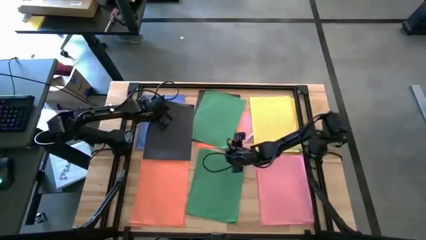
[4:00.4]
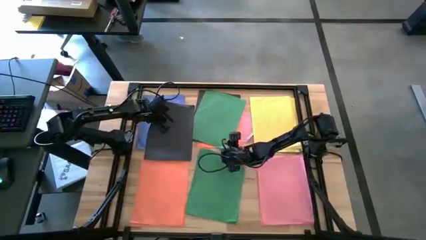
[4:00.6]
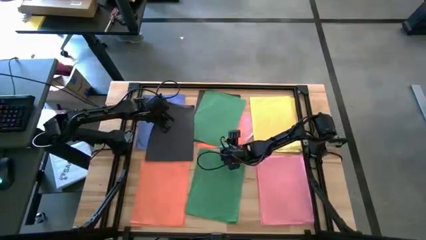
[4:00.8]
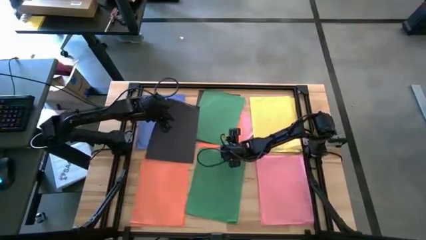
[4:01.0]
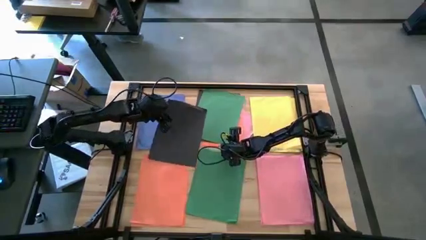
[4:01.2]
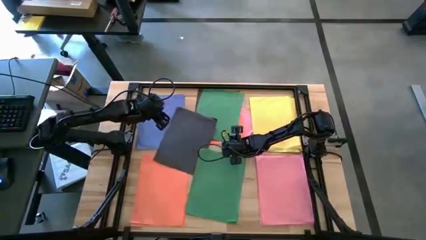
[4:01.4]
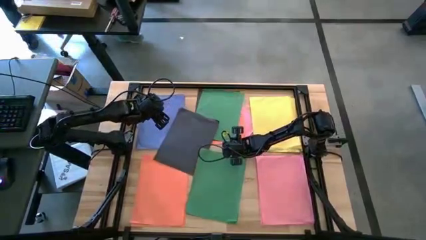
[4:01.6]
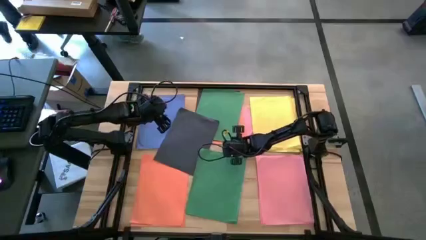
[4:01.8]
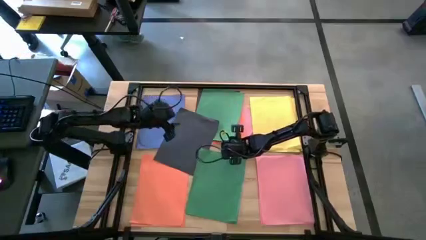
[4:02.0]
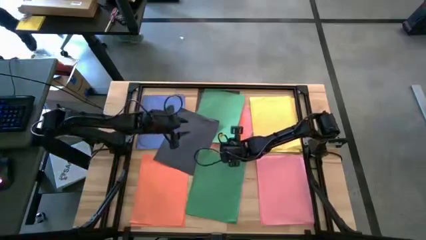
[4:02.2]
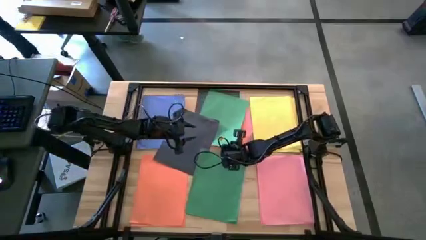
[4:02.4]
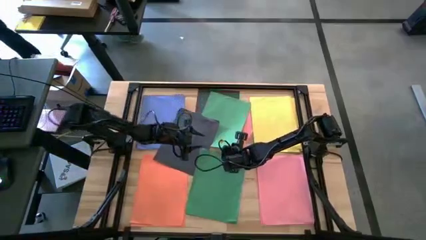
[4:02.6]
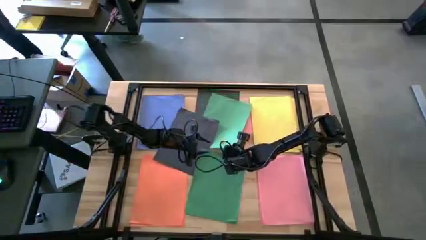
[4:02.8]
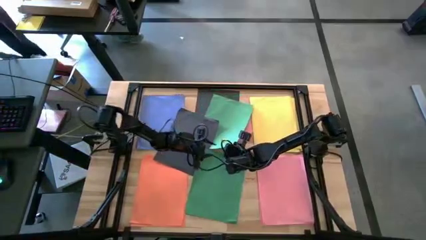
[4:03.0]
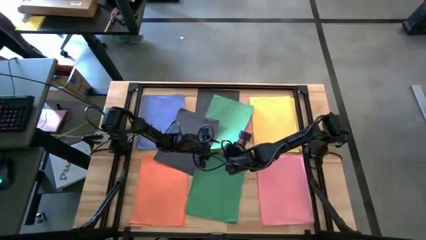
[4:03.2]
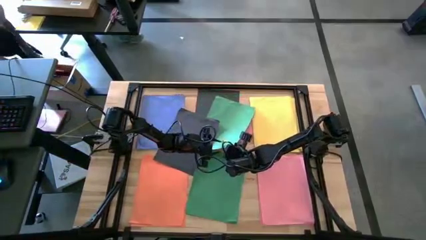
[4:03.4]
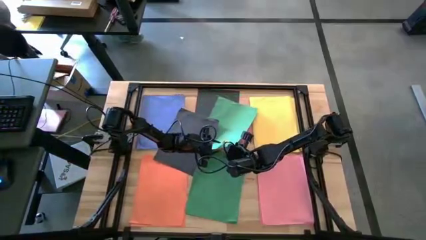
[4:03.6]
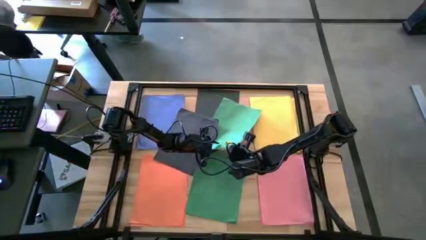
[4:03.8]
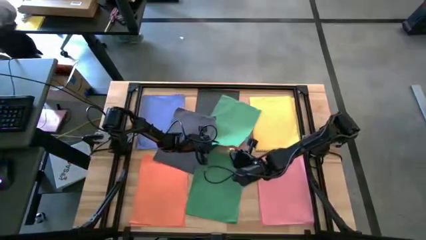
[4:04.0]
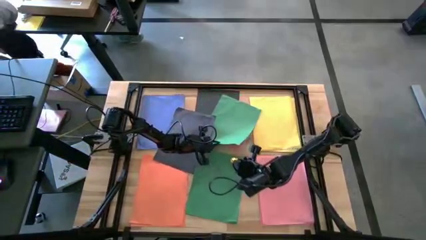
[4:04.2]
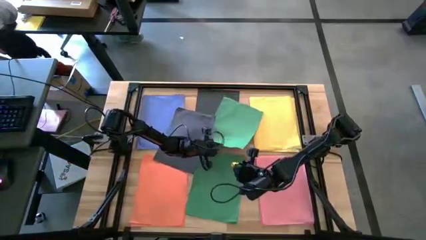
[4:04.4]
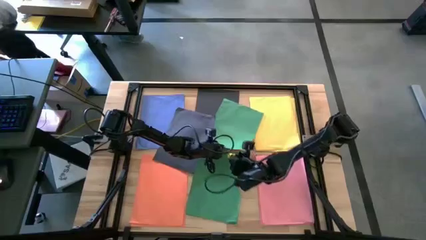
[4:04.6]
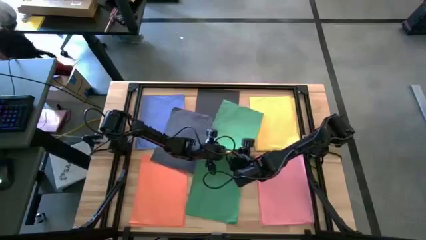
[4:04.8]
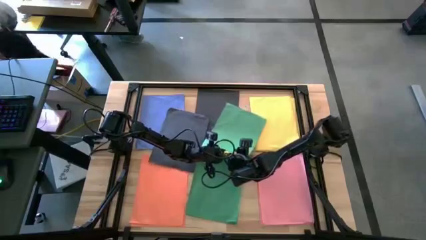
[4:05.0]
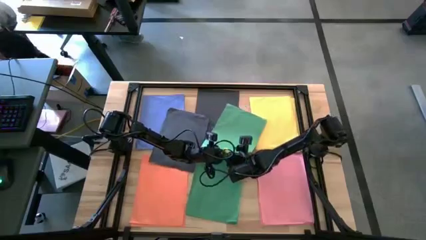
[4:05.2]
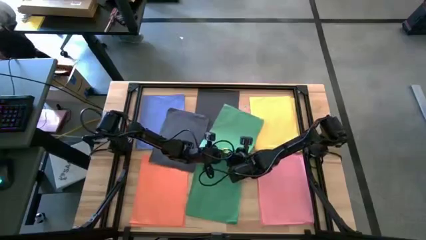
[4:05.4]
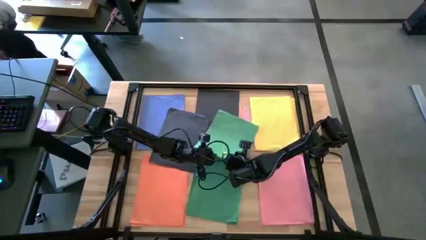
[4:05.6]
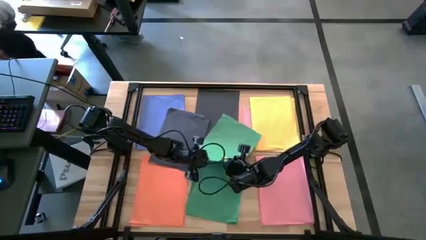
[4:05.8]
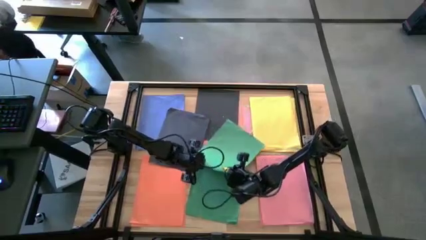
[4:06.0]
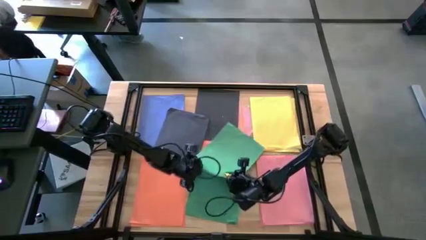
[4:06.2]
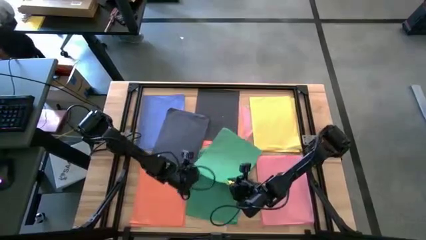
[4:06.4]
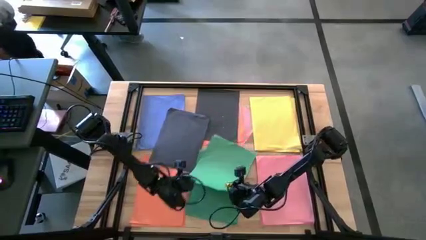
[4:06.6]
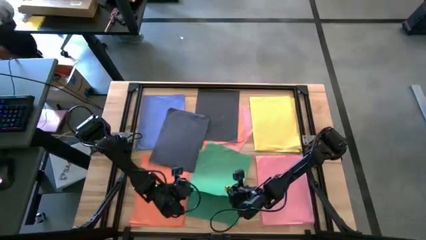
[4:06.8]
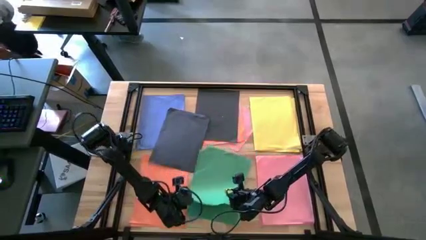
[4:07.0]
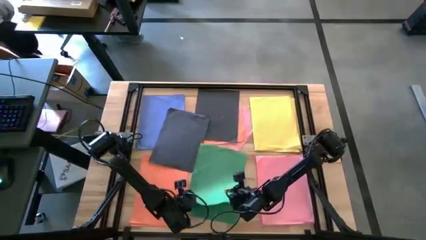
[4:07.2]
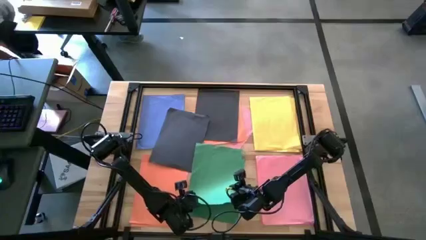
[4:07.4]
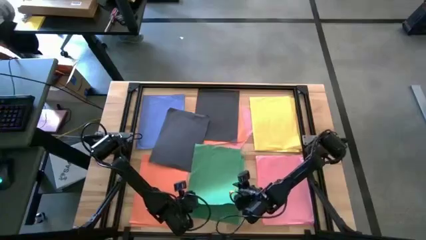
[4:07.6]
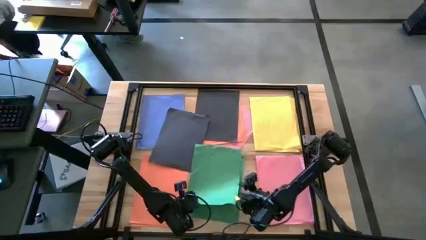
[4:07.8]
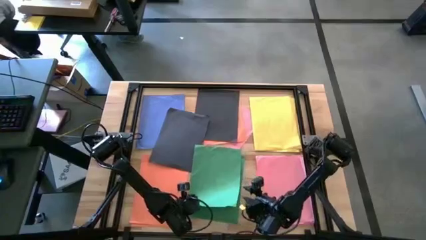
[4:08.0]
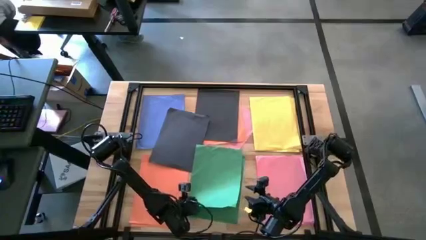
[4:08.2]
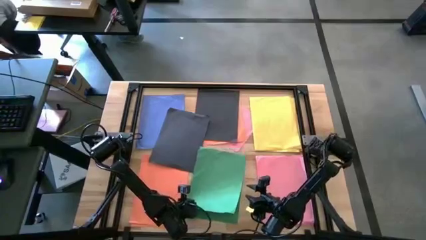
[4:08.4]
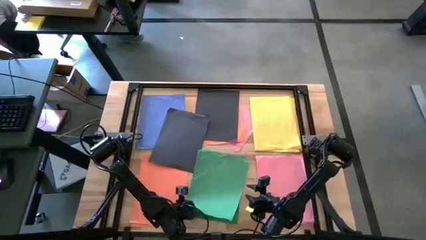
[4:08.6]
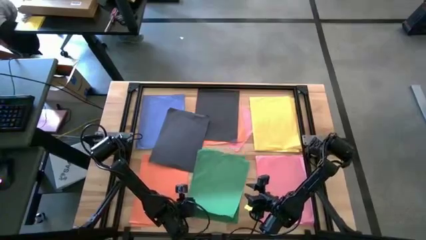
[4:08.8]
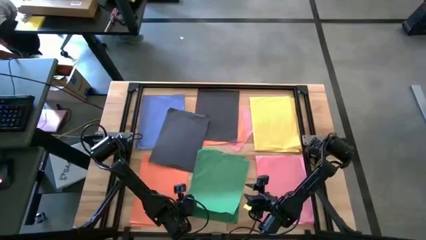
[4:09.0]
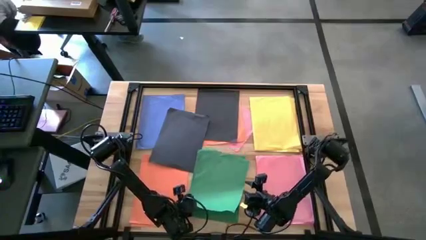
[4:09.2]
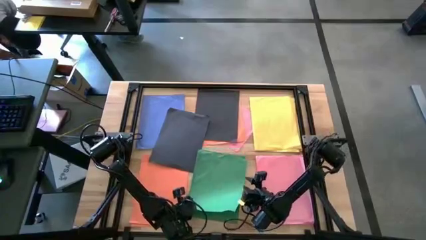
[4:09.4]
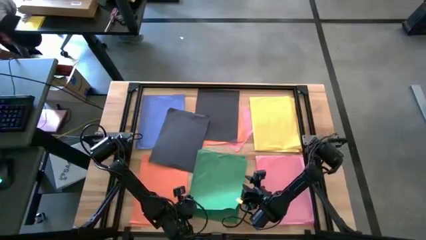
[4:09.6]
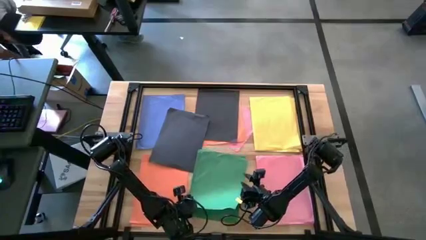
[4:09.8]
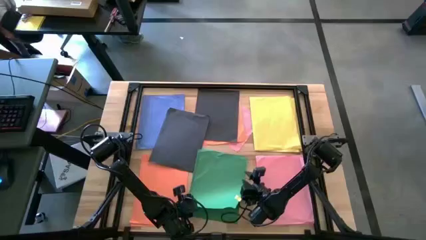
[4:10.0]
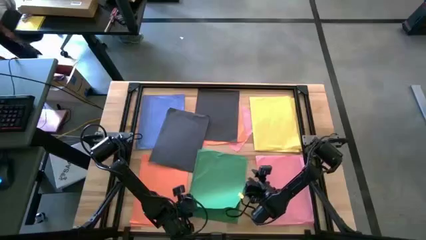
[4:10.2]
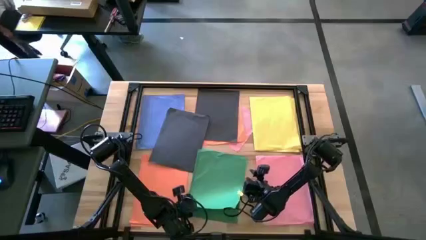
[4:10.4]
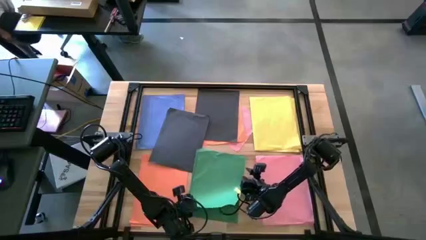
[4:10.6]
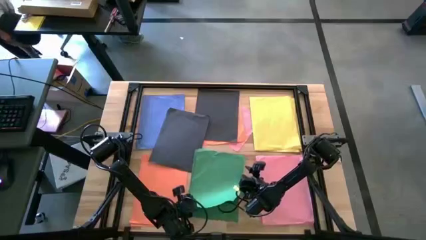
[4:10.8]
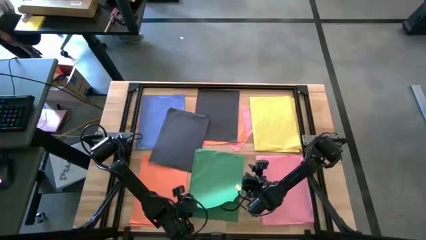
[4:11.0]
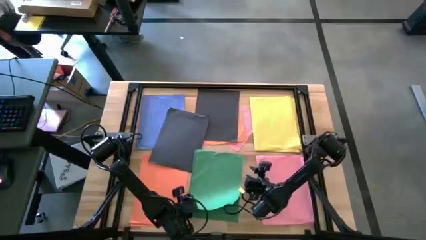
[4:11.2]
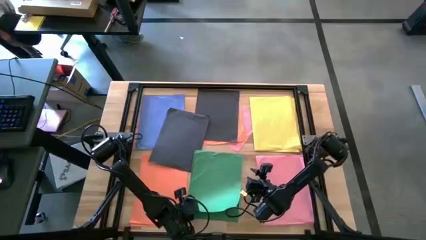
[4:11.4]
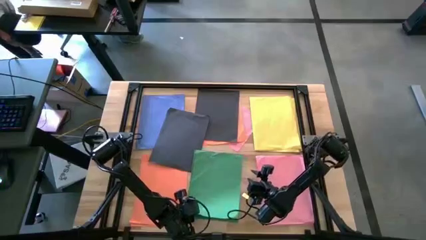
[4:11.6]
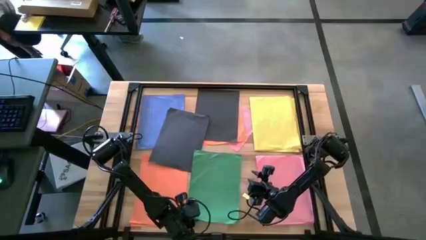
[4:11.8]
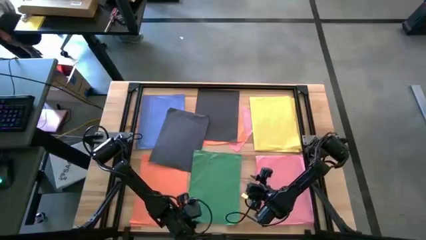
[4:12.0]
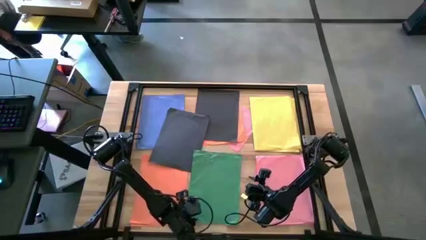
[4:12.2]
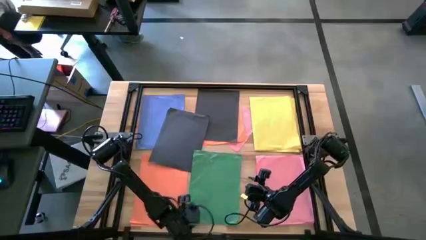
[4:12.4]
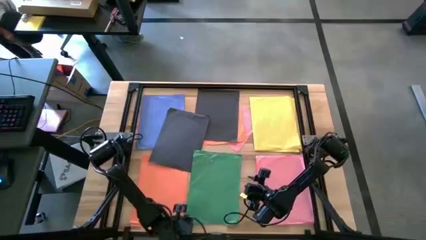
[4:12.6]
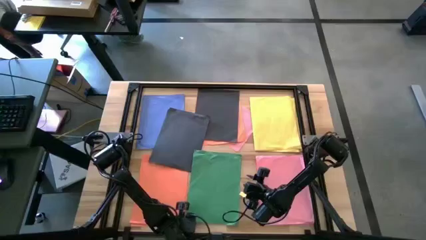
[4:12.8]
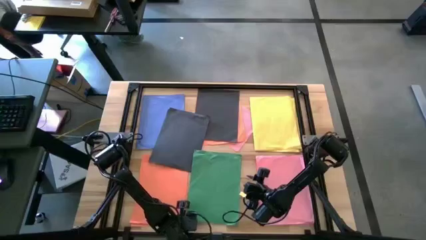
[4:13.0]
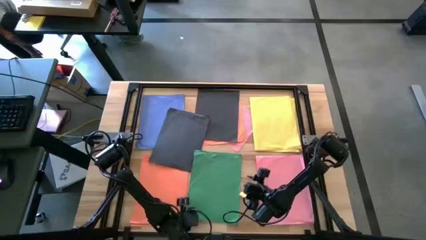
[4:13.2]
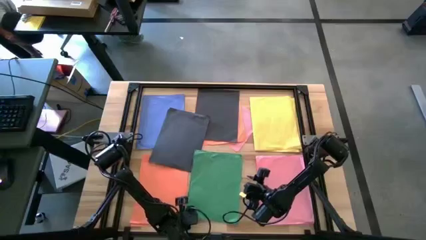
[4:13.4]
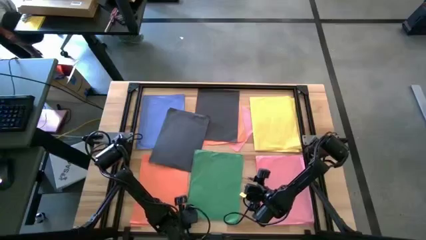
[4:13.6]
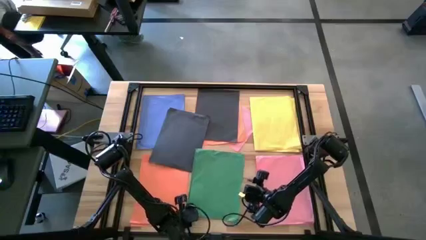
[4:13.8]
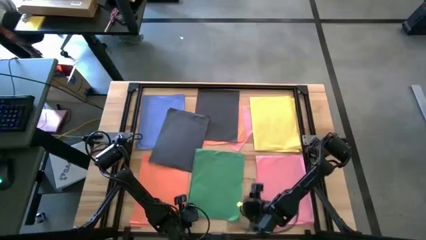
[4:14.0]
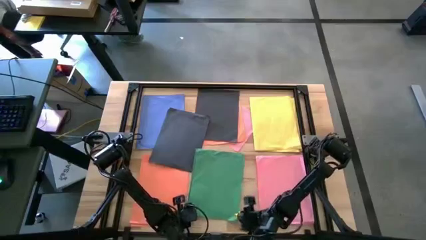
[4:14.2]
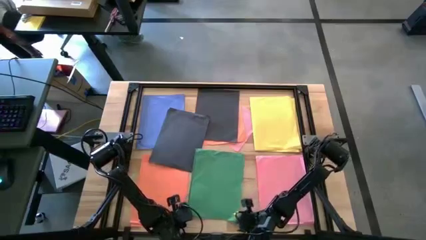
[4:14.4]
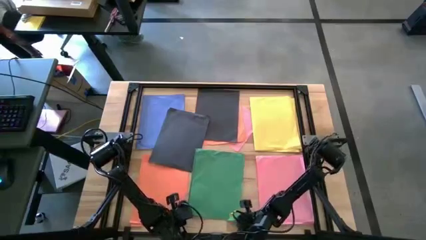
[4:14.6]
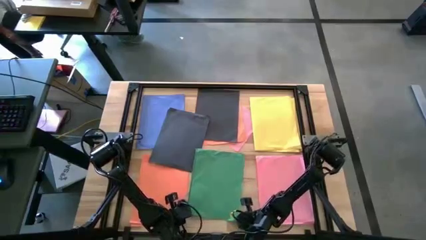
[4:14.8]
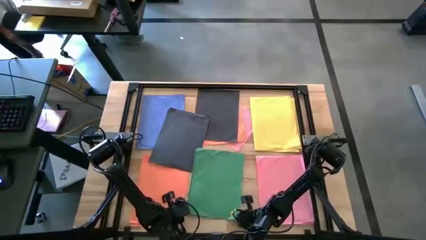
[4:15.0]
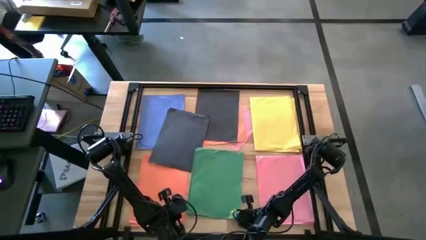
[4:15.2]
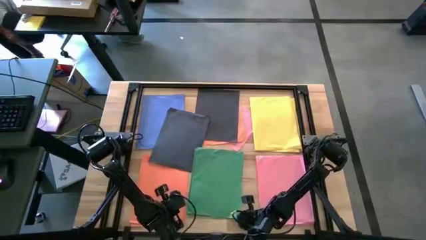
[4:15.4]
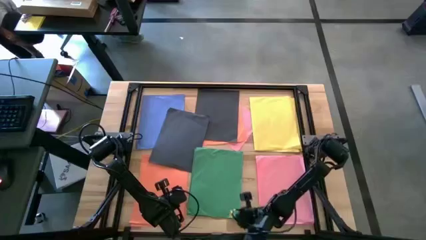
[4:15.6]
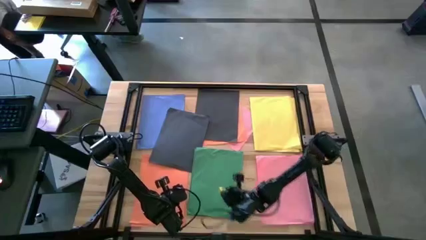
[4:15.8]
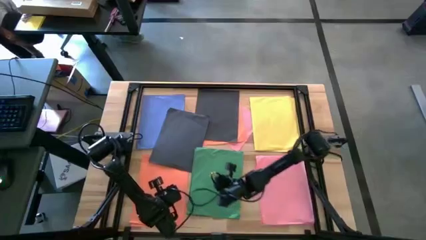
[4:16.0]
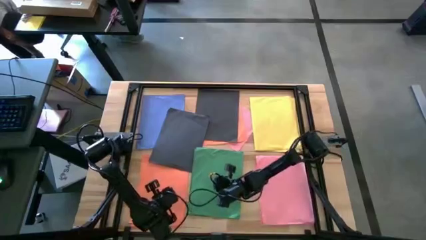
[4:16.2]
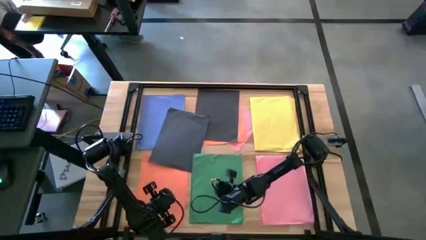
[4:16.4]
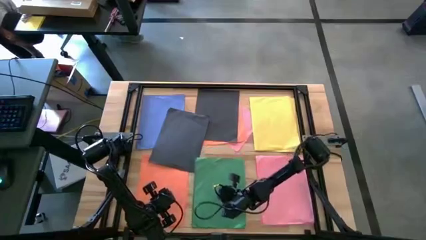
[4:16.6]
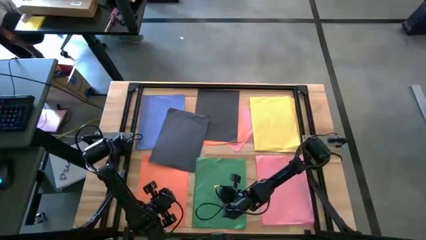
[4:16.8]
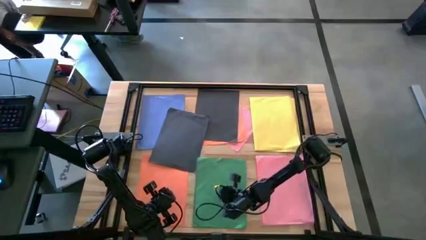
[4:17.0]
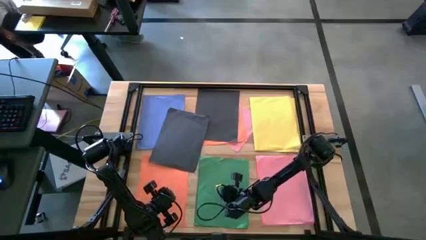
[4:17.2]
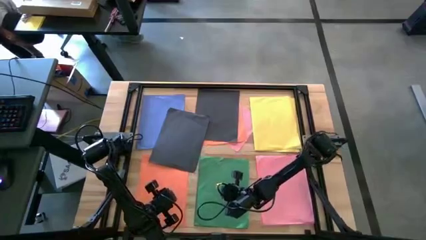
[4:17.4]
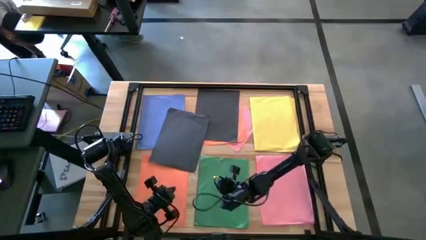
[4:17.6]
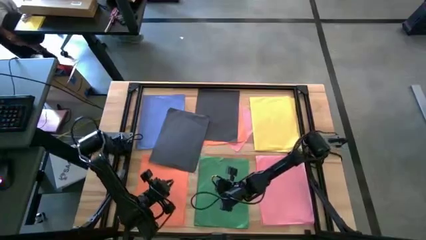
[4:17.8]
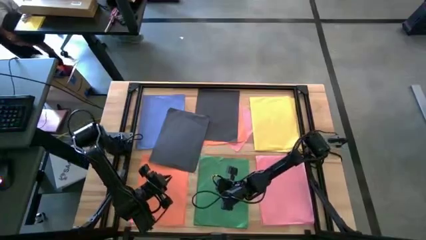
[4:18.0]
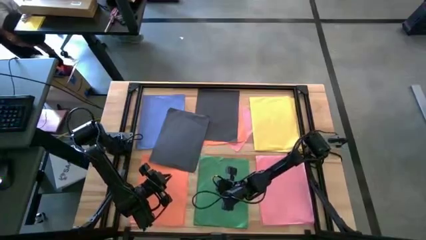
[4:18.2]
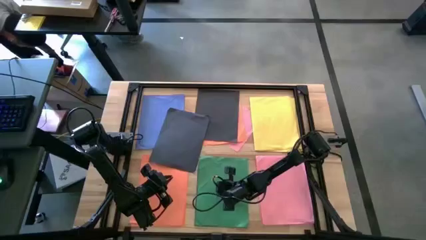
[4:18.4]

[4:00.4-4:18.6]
Task: Organize paper
Stack the top green paper on the bottom green paper
